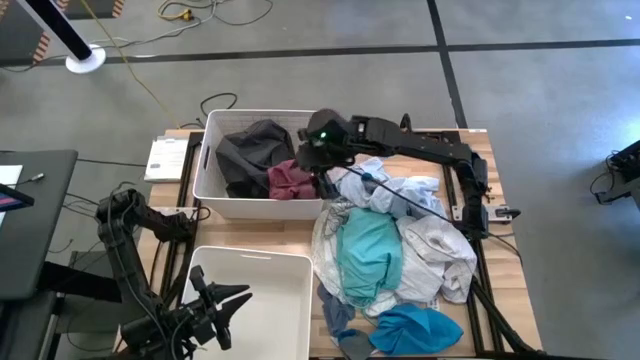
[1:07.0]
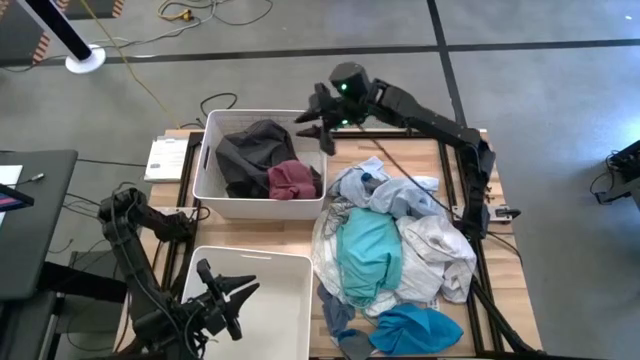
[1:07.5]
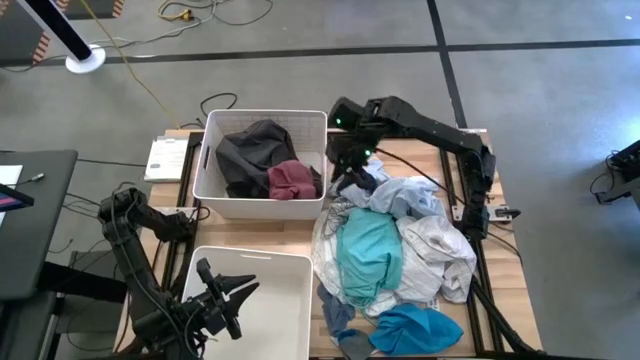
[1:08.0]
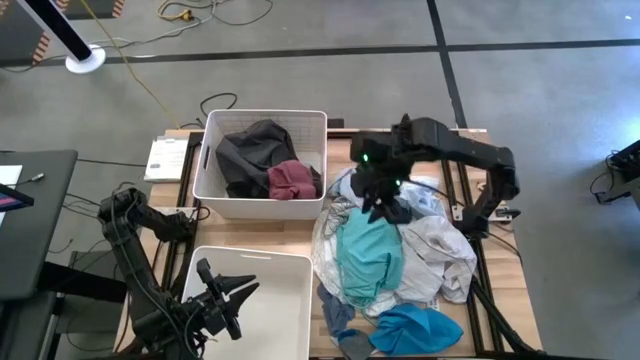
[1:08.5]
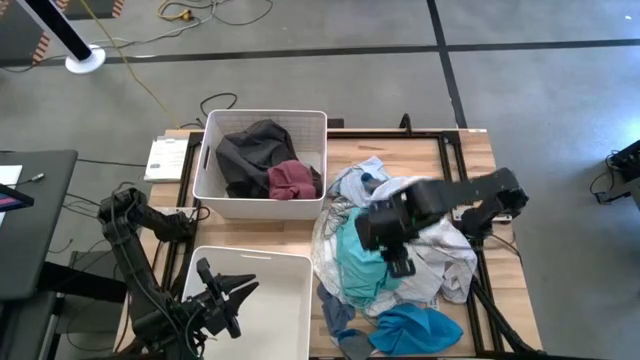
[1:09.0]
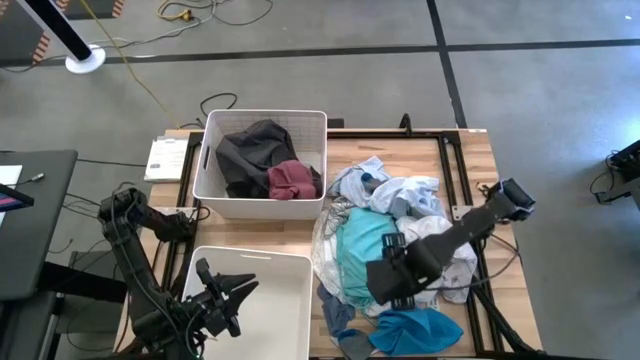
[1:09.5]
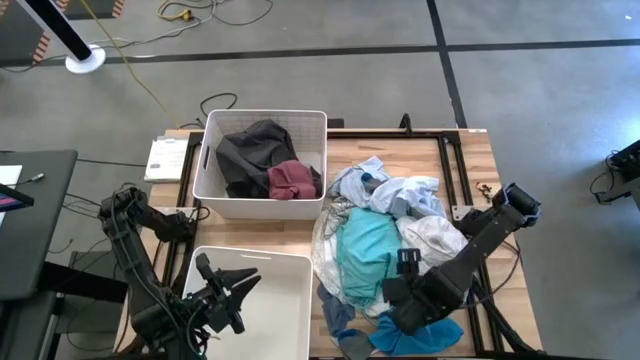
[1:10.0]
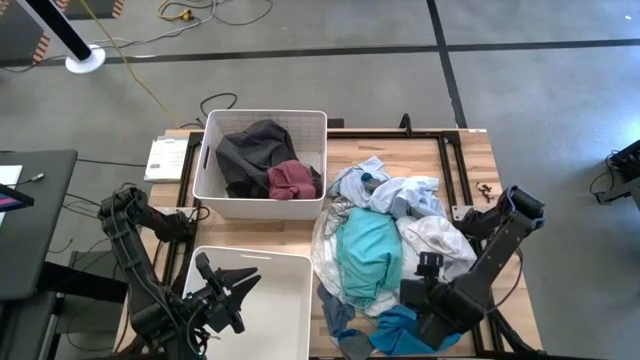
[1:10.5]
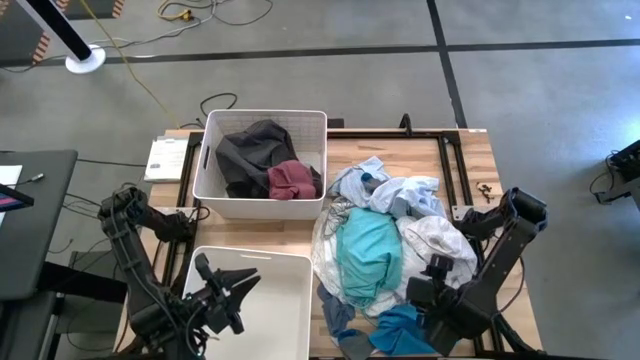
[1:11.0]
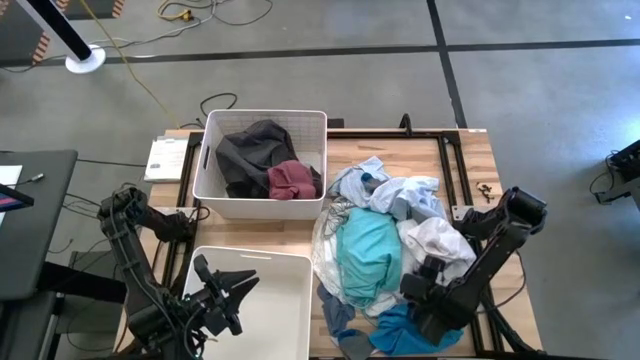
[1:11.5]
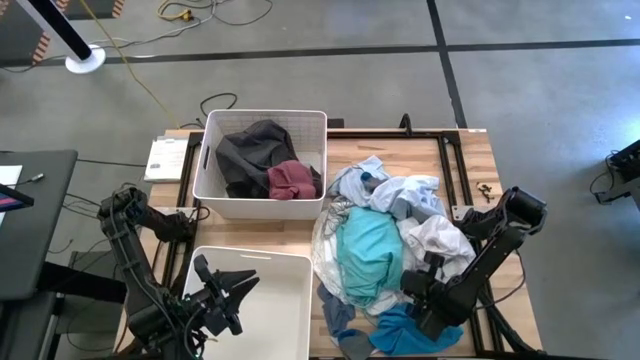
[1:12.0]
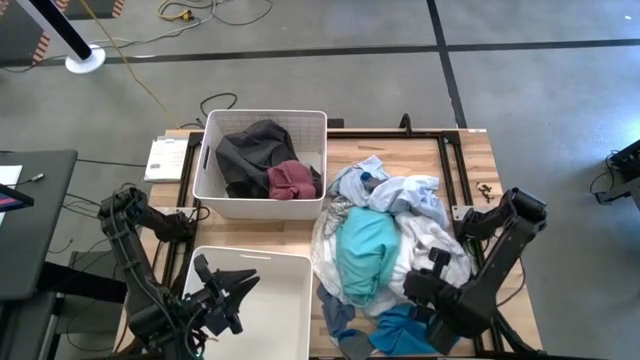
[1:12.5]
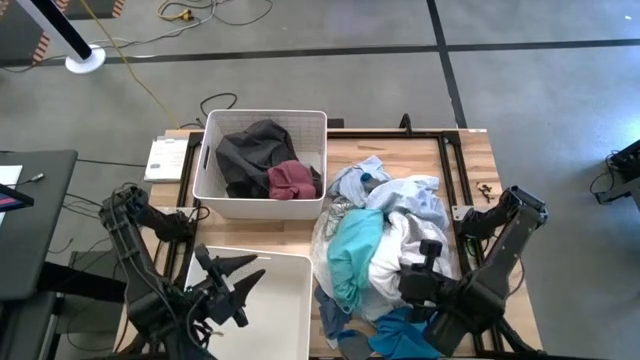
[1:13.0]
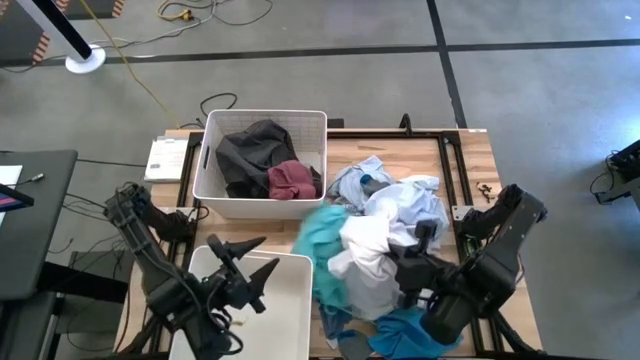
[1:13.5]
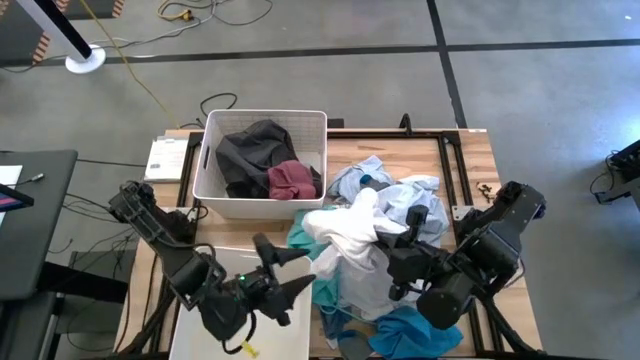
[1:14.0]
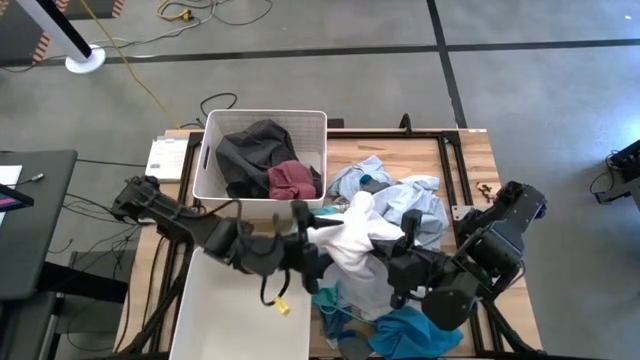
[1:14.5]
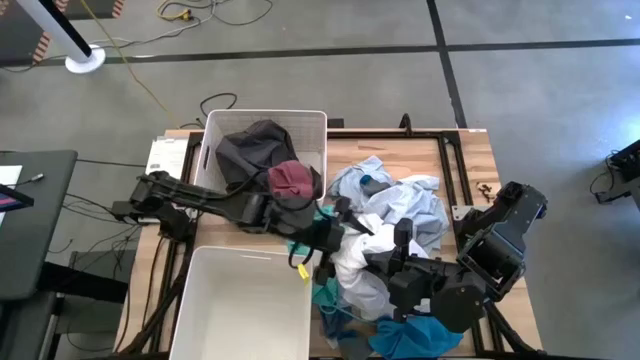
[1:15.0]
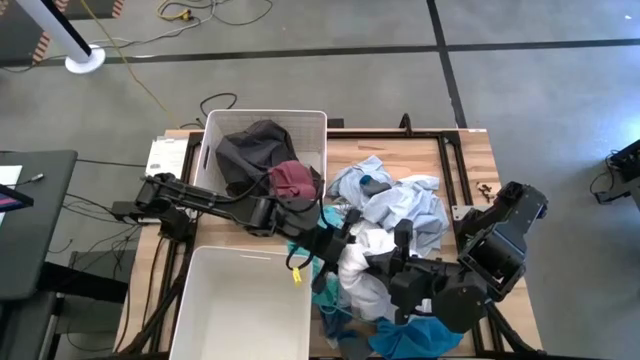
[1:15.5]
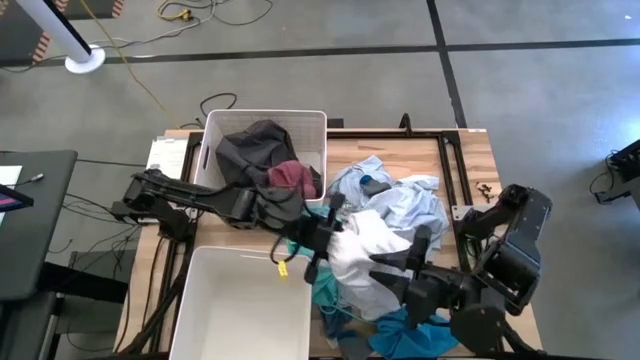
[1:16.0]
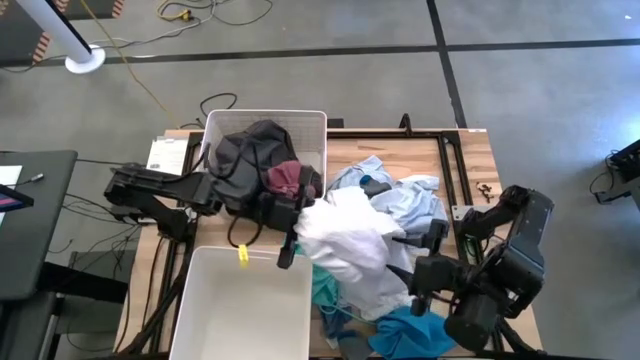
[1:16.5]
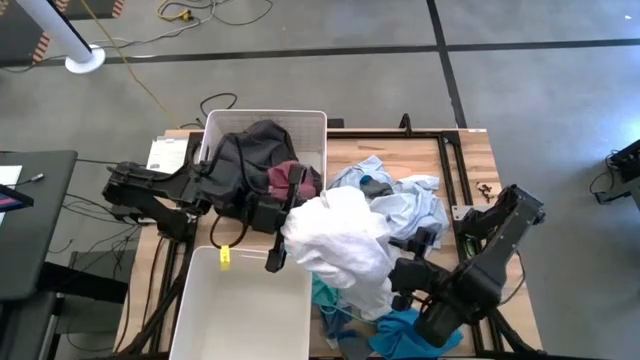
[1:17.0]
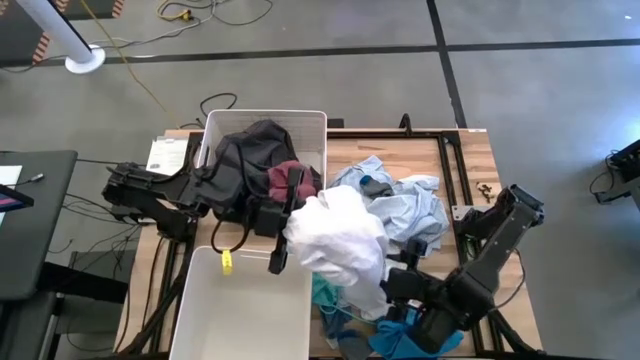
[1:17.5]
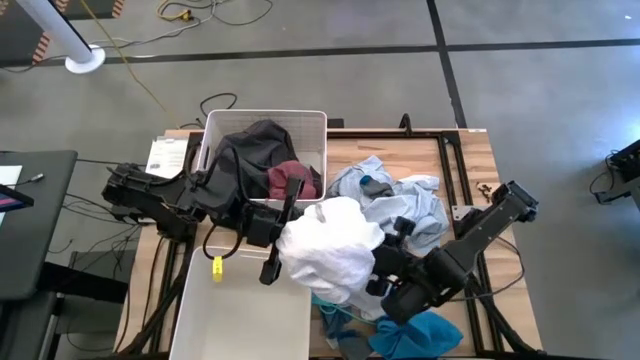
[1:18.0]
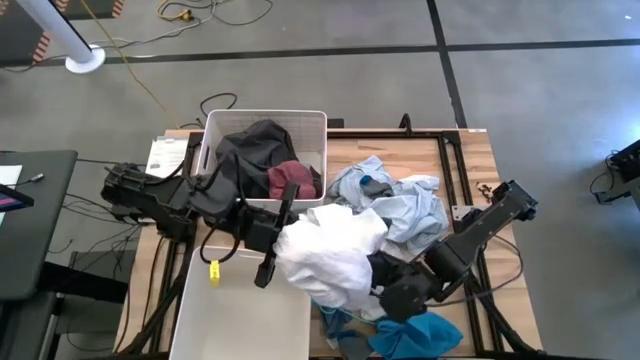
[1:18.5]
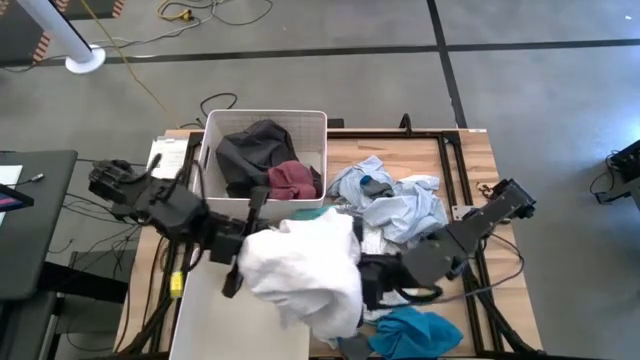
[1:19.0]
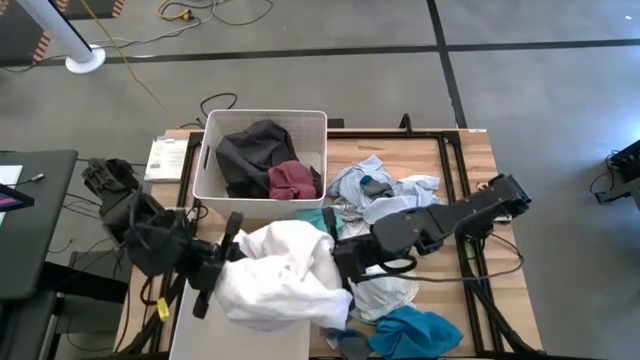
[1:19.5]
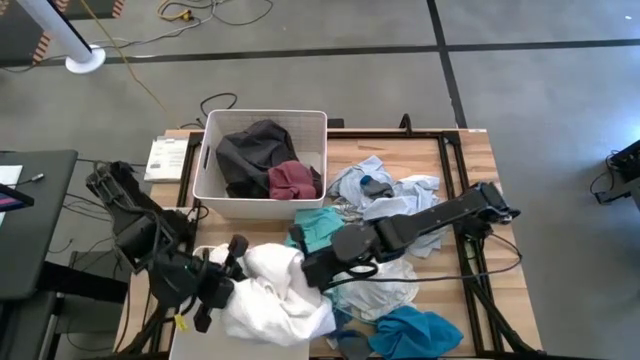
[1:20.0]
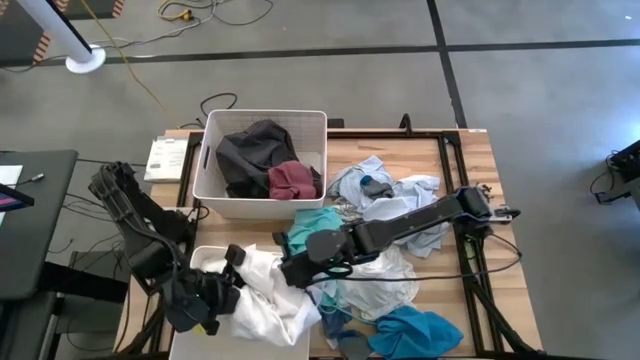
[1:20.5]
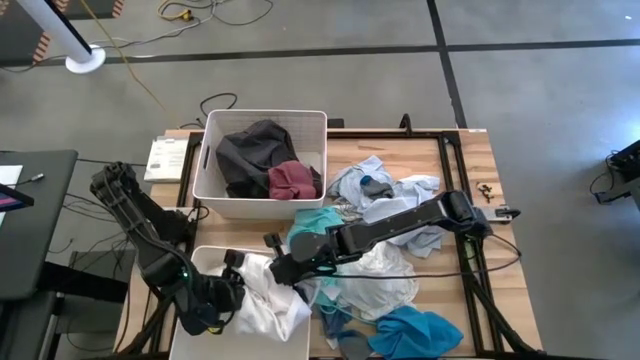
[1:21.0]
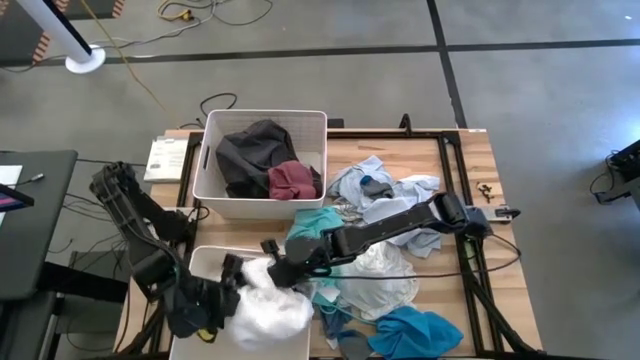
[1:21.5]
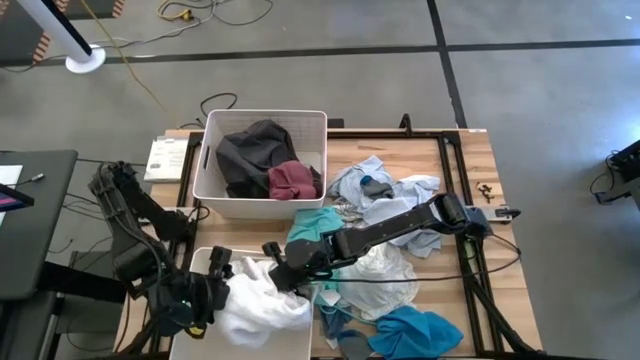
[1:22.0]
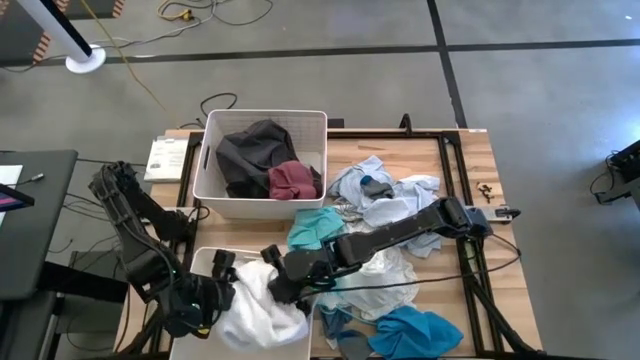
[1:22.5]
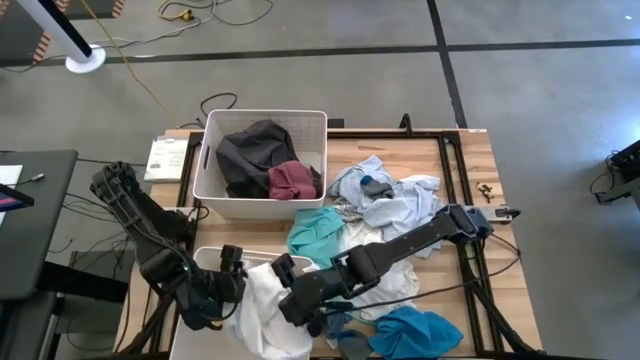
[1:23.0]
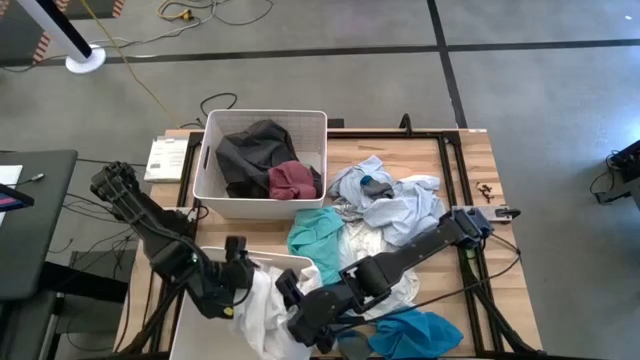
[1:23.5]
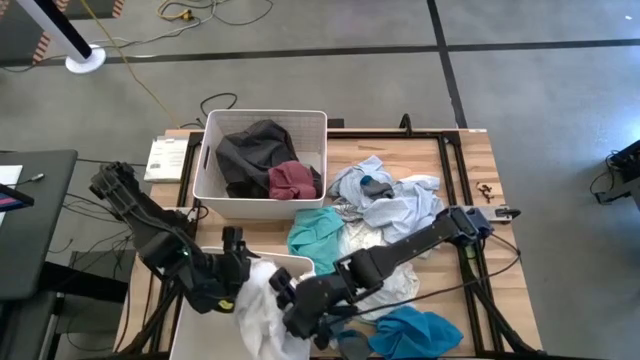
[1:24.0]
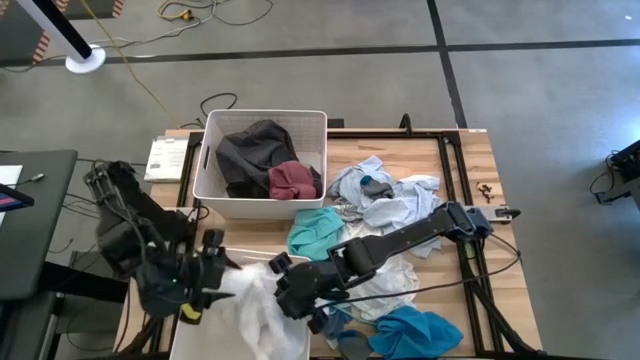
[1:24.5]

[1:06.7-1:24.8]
Task: Sort clothes
Put the white dress into the bottom white laundry bin

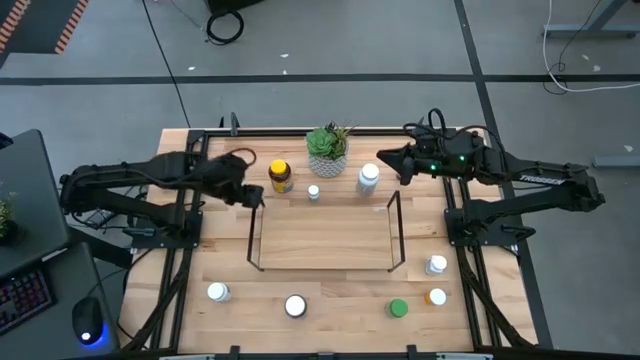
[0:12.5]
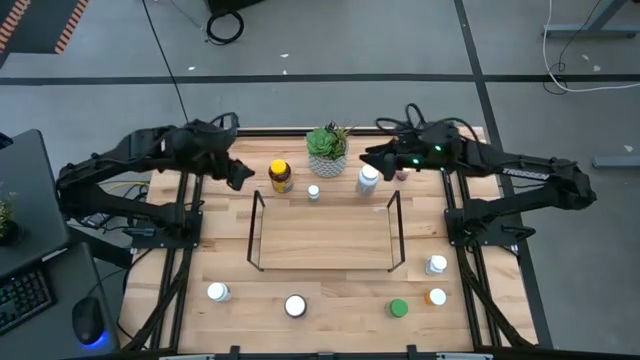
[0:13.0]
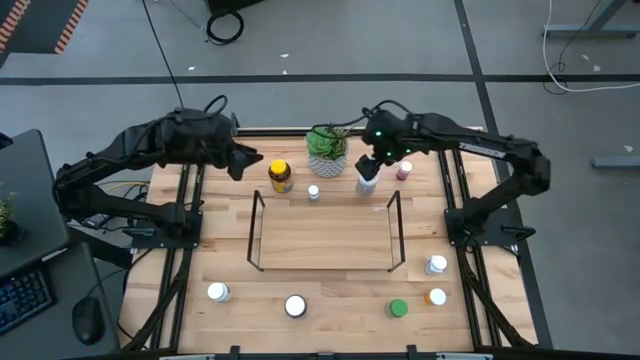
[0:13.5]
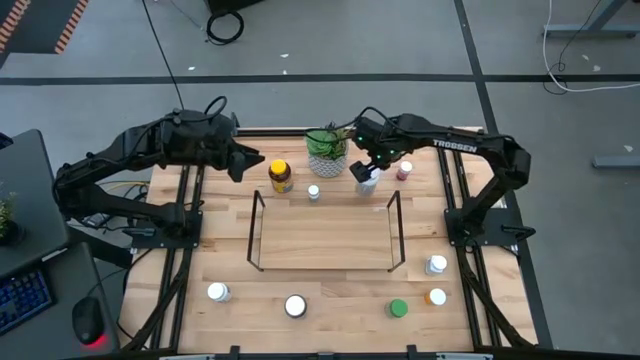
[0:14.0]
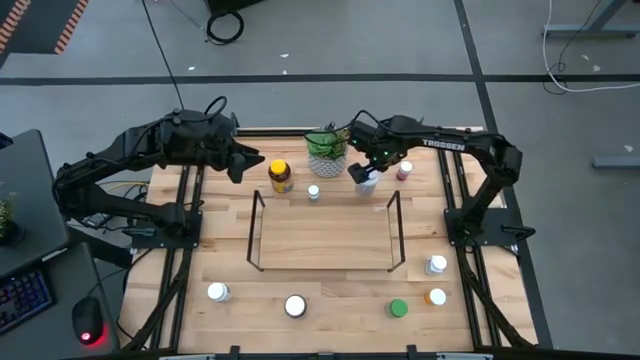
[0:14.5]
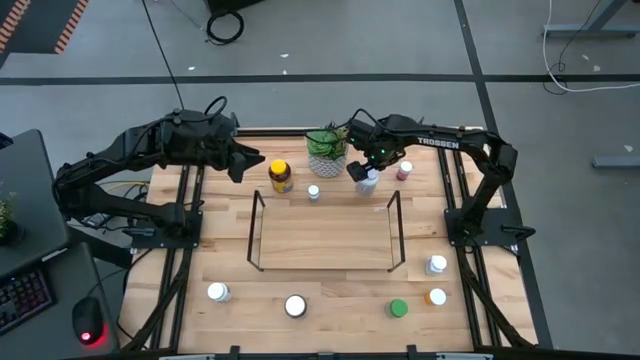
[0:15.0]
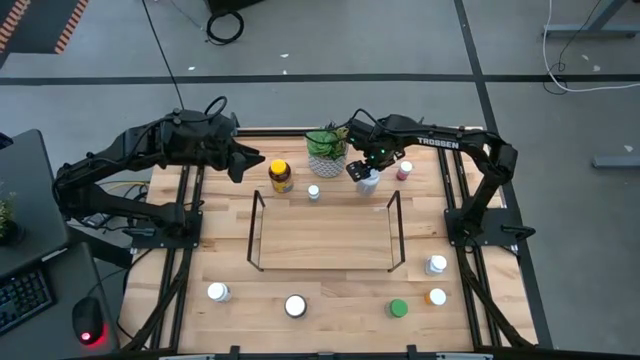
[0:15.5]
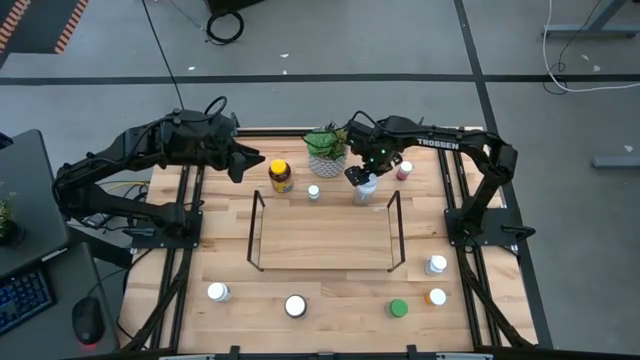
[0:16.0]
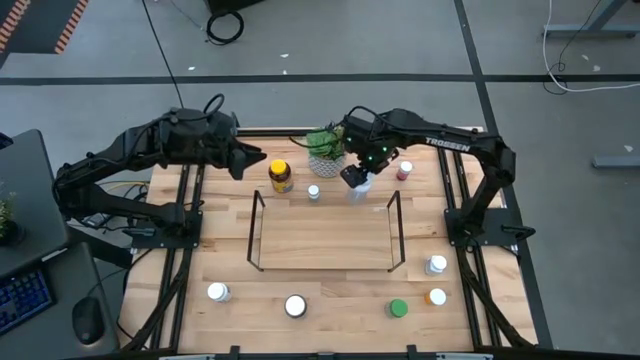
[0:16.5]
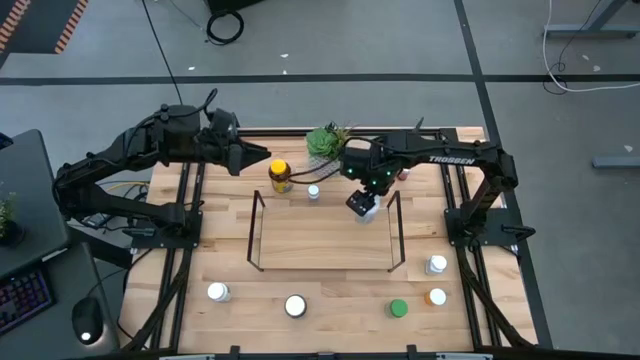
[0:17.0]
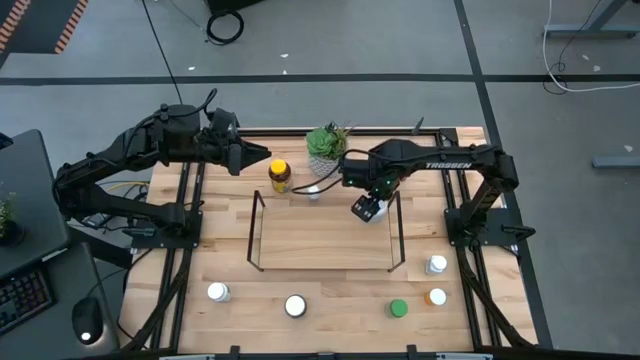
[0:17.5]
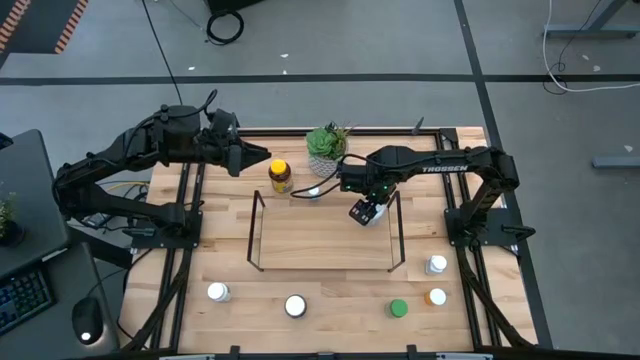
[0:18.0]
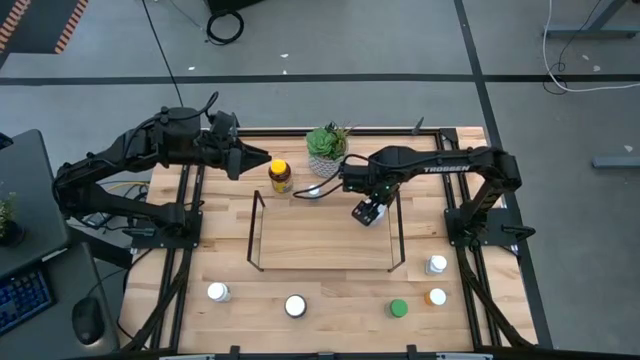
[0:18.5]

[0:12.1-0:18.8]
Task: Pick and place medicine bottles onto shelf by color
Put the large white medicine bottle on the shelf
